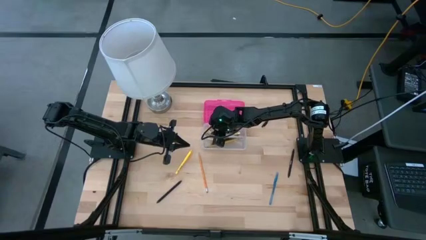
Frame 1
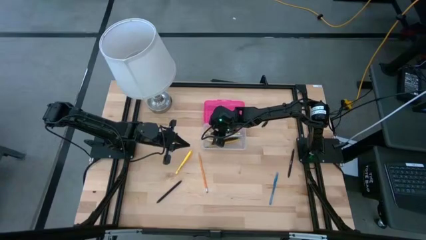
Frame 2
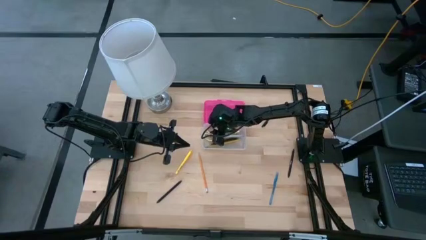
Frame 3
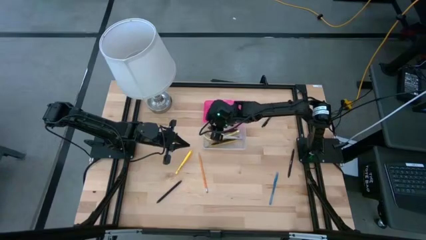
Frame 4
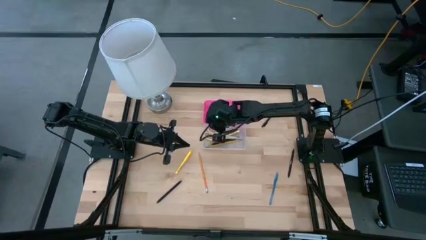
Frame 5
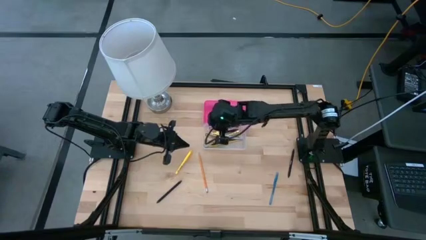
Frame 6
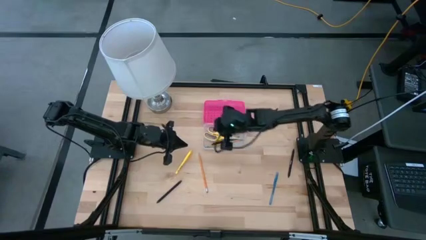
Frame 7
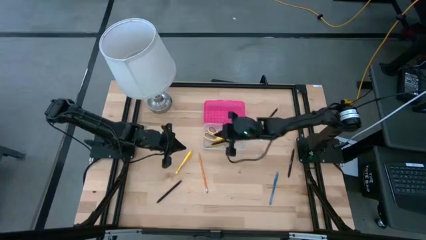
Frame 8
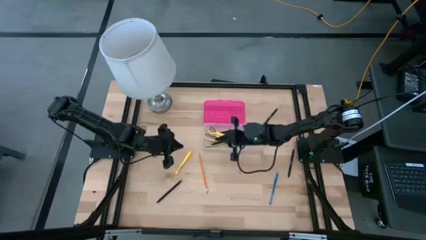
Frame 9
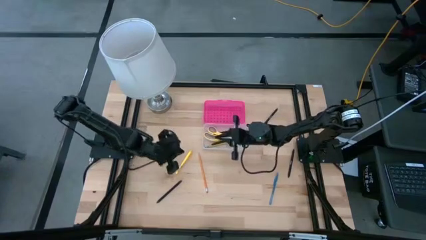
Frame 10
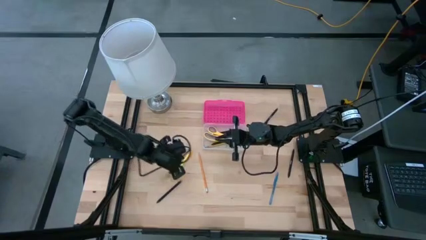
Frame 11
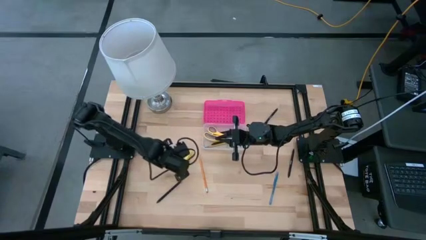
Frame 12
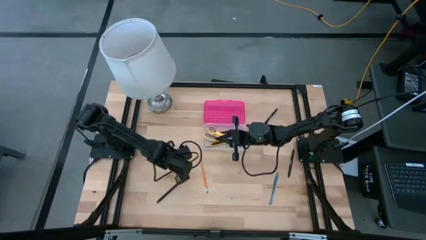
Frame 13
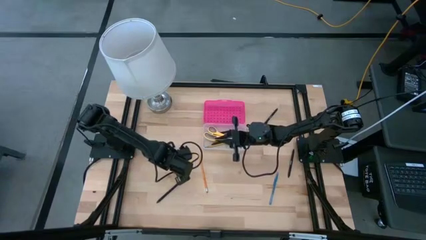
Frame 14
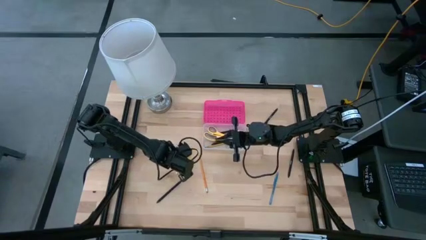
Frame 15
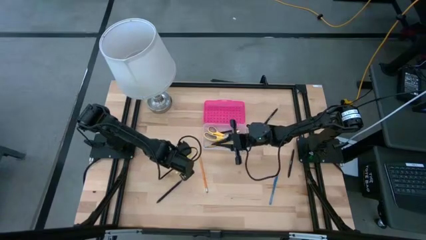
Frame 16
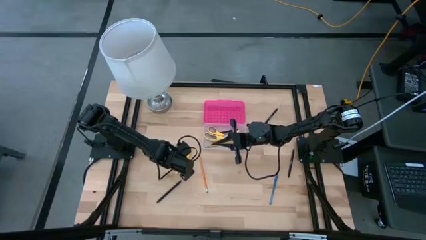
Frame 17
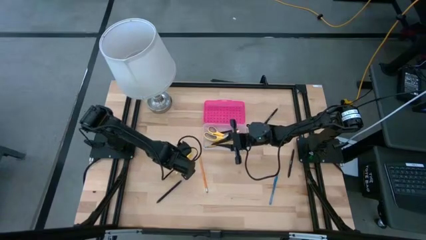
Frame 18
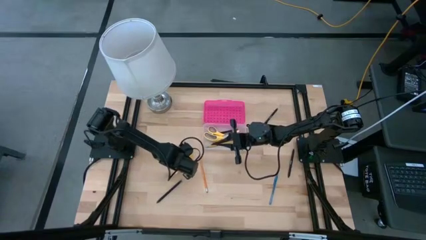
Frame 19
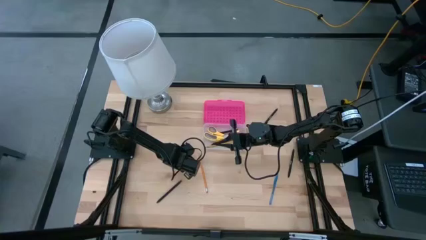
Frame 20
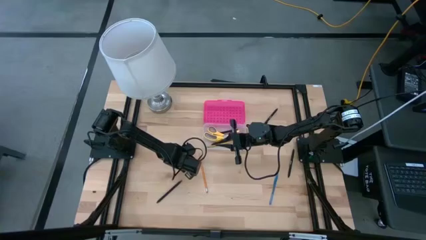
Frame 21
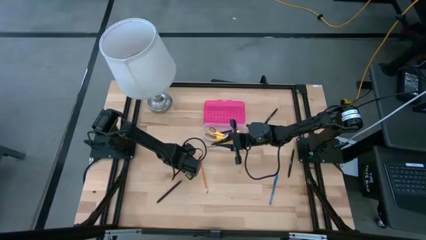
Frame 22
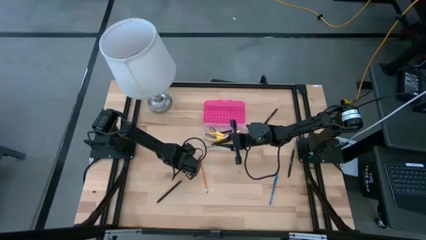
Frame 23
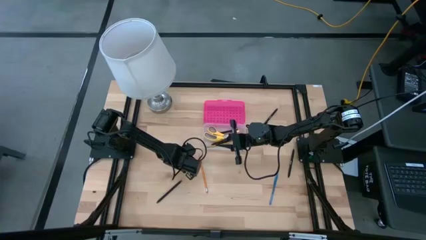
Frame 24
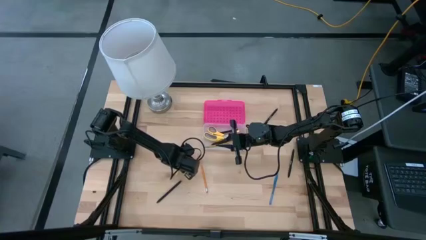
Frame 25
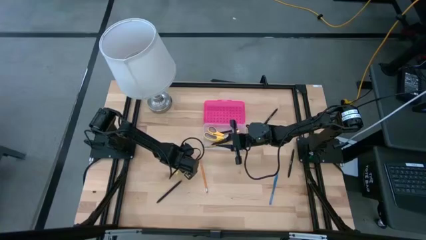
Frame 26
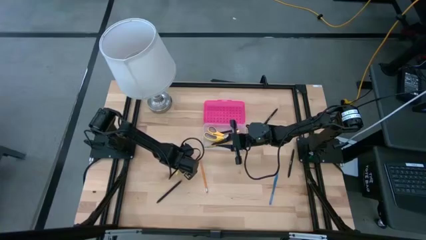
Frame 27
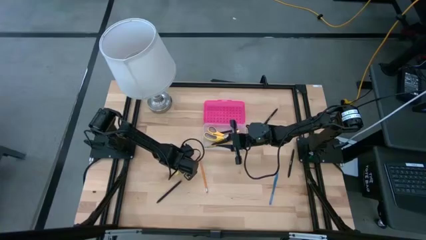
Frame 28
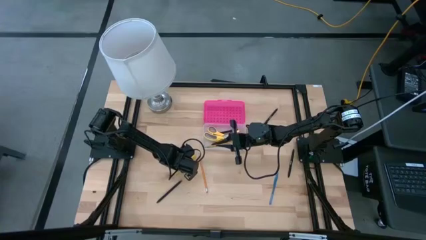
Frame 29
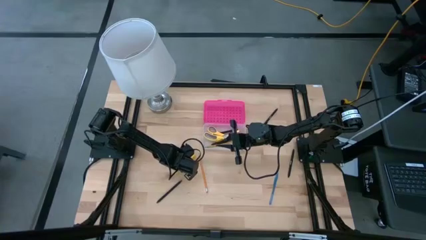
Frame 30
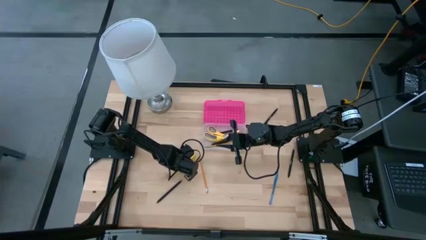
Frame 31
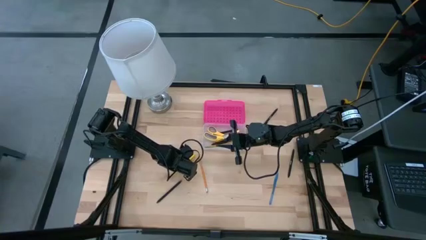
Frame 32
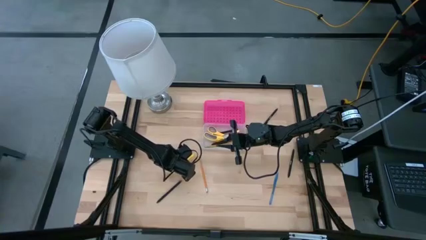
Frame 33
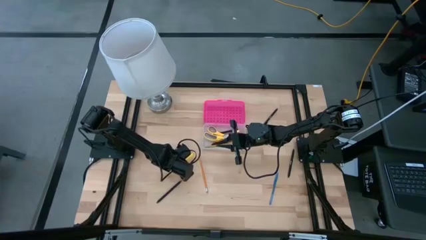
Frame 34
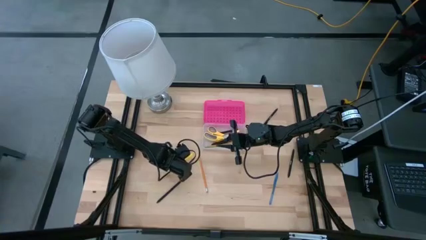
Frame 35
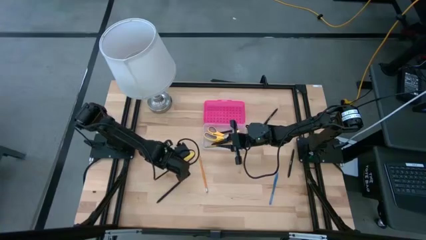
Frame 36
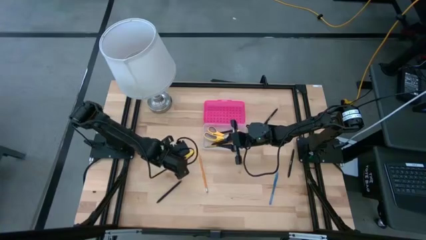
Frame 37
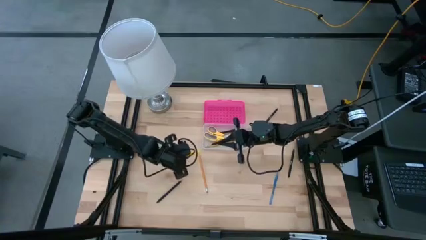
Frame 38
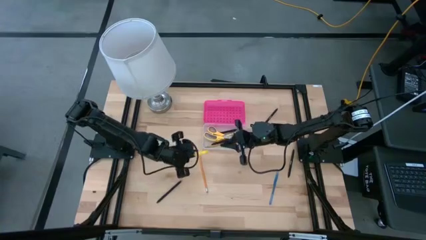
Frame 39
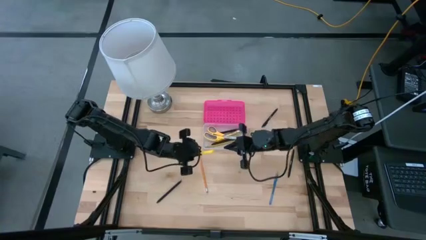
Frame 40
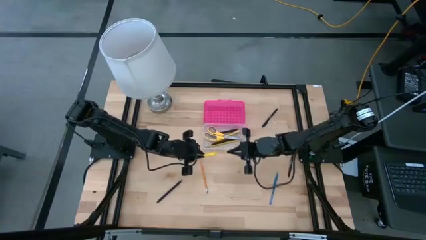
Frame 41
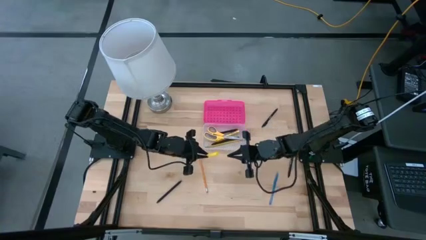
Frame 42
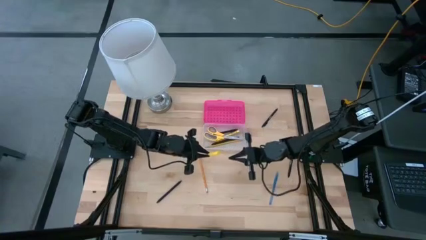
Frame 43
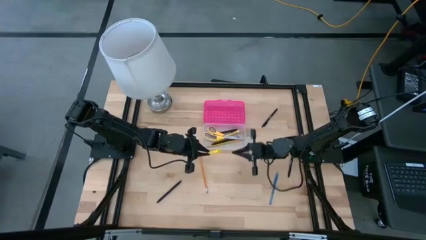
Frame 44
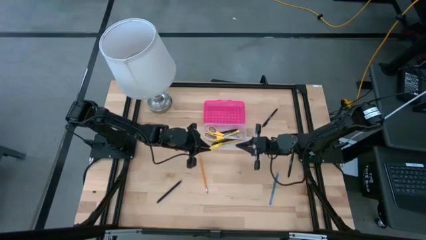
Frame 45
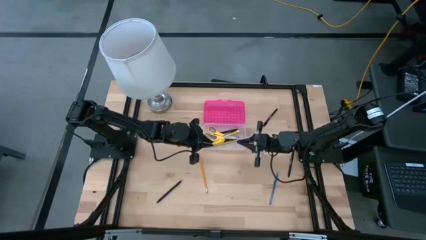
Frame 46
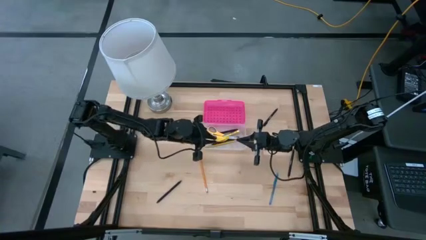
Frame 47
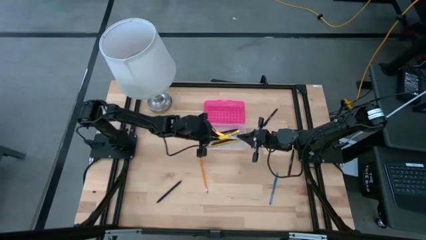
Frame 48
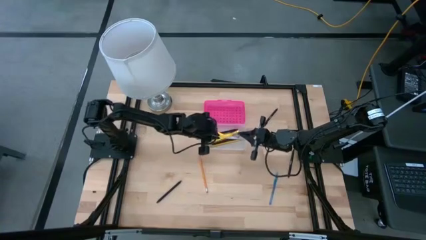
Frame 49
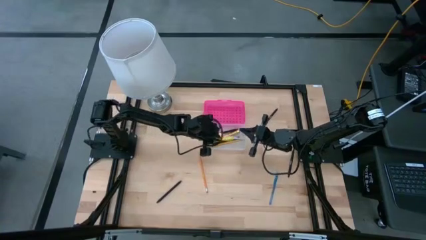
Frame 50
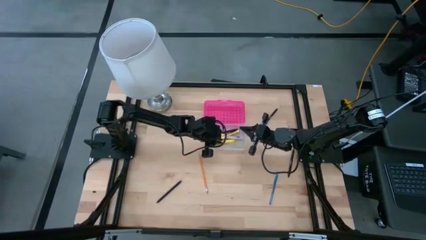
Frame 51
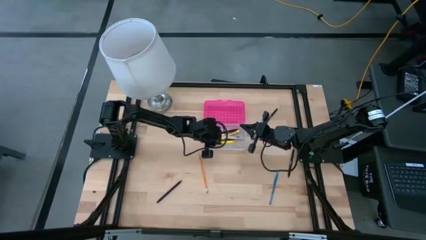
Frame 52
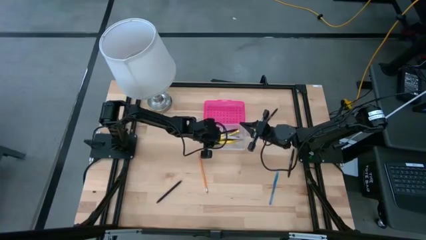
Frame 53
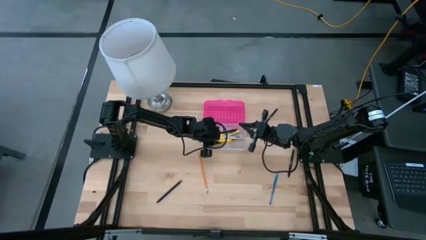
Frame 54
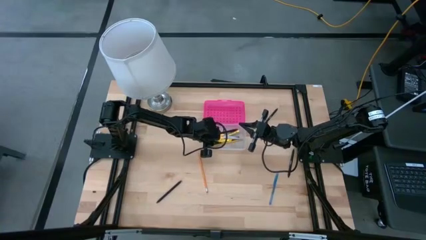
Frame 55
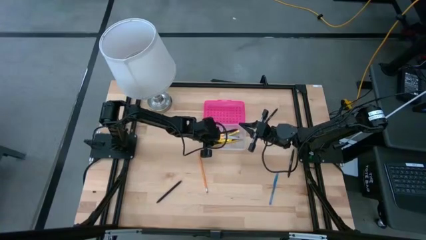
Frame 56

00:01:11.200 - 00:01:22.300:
Task: Pick & place school supplies into a supply box
Put the yellow pen into the pink supply box

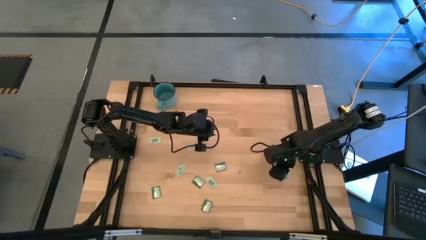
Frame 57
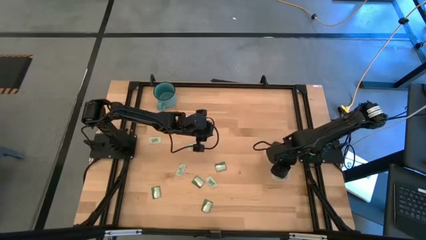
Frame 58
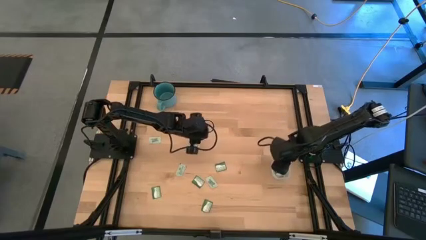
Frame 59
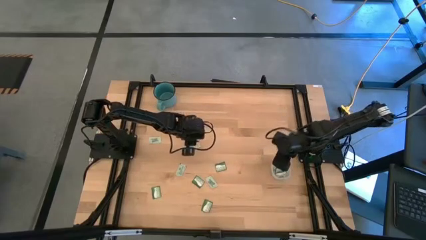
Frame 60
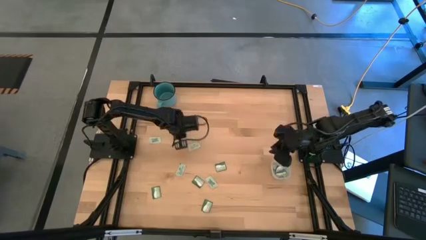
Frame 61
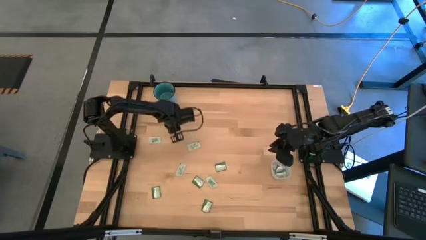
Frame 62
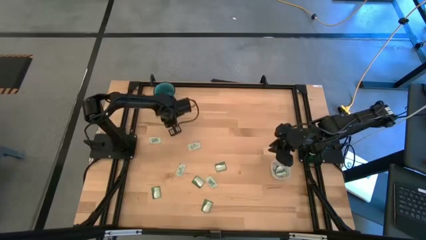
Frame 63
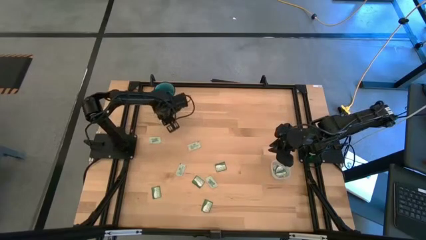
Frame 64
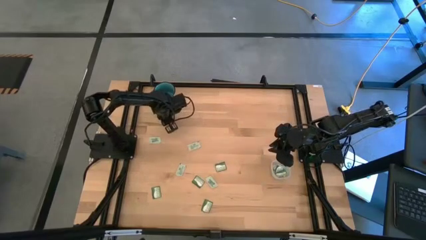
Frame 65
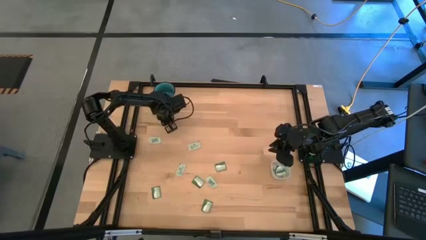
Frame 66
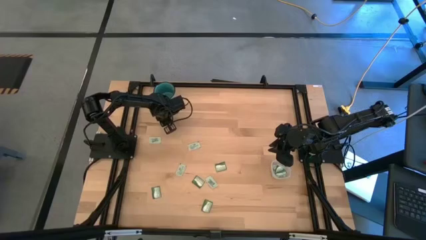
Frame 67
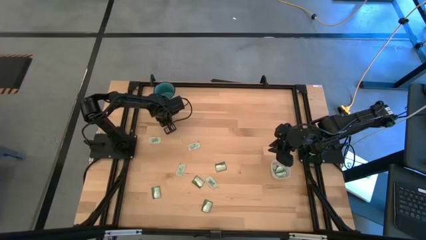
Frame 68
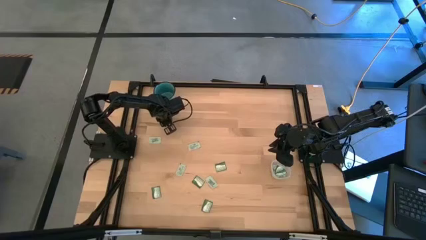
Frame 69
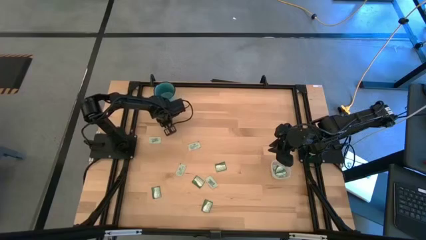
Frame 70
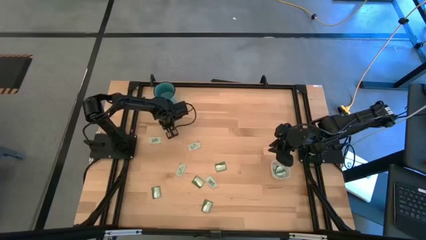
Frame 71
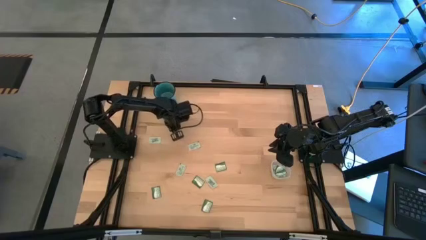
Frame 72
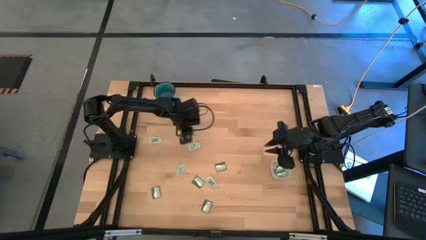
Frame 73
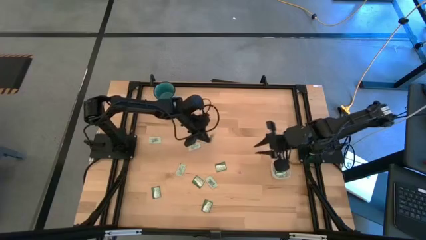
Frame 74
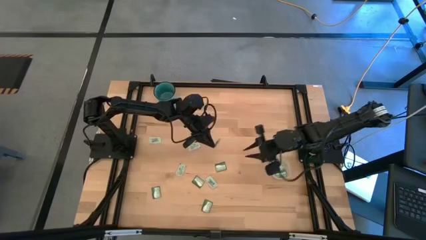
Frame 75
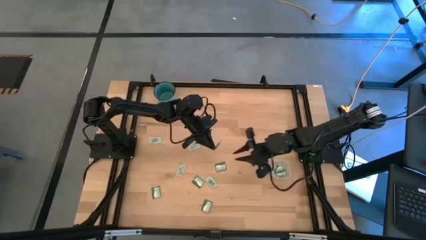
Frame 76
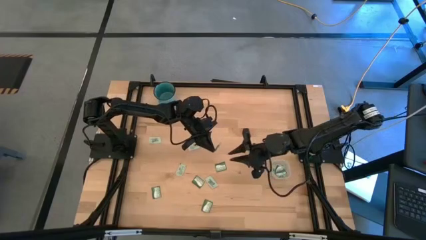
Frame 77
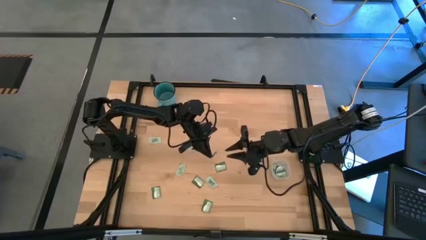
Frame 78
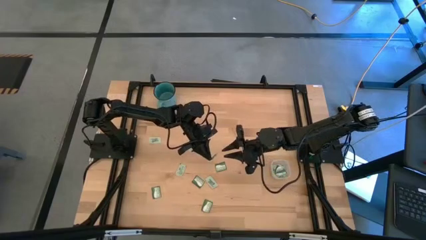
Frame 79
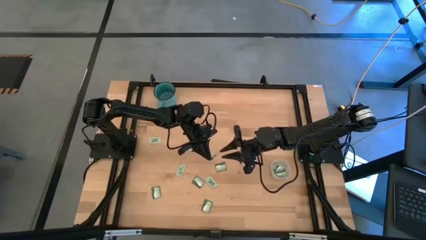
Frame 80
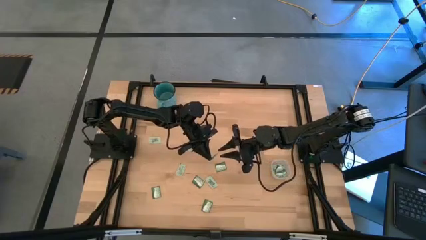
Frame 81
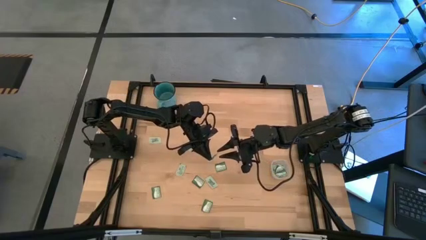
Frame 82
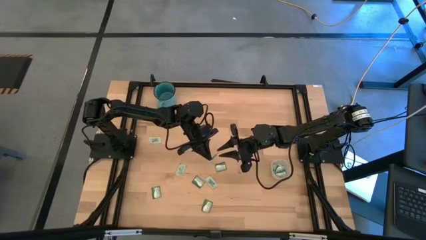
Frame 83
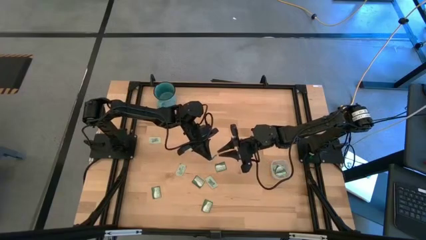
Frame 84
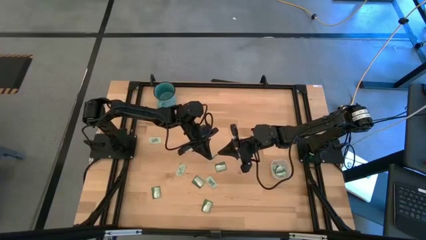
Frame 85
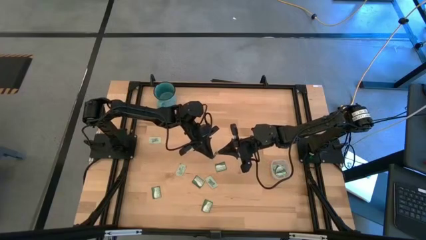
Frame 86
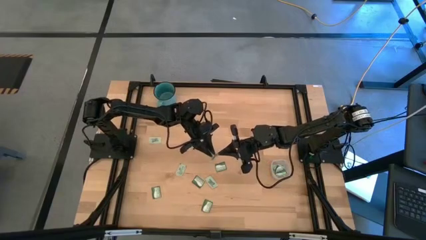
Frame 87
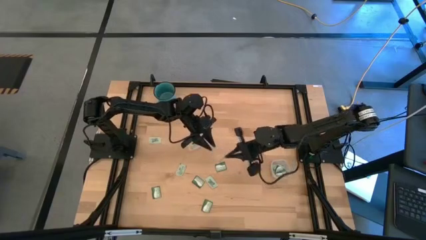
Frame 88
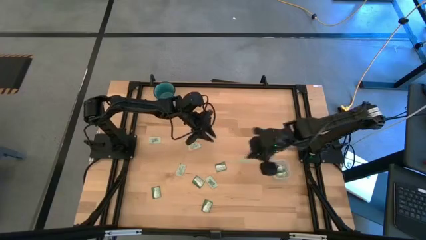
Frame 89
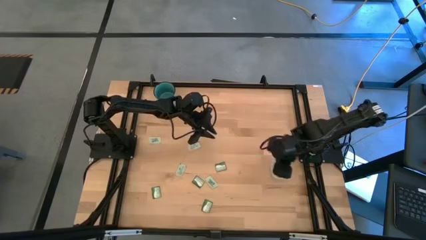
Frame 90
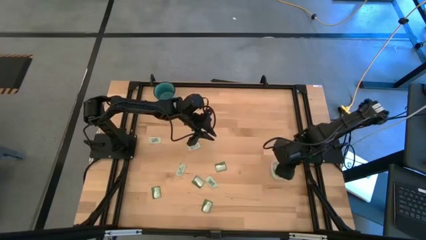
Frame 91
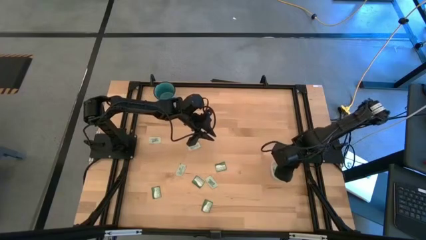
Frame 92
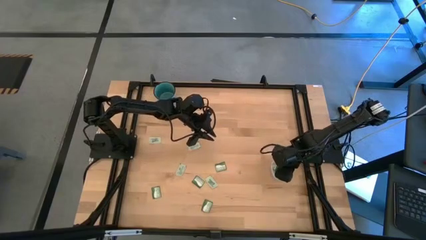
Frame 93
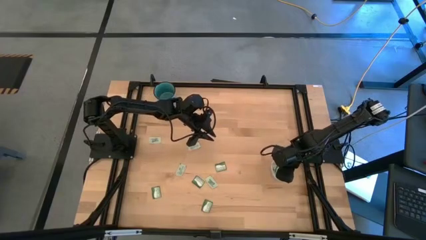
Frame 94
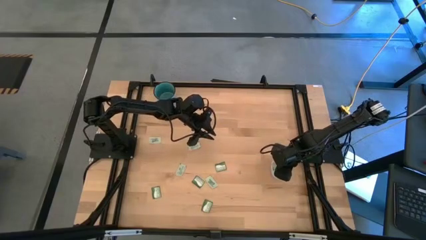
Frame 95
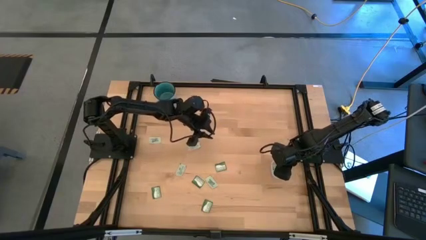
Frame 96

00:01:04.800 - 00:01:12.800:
Task: Pick and place items into bin
Put the white stevia packet into the transparent bin
